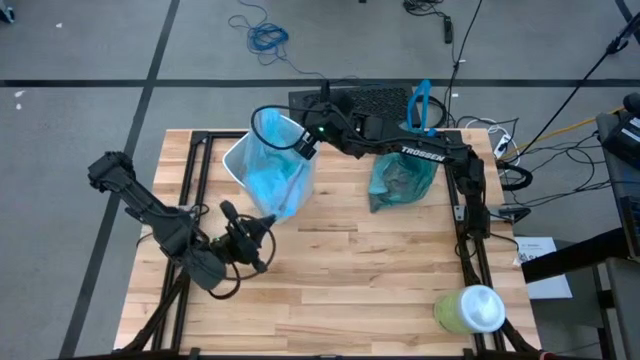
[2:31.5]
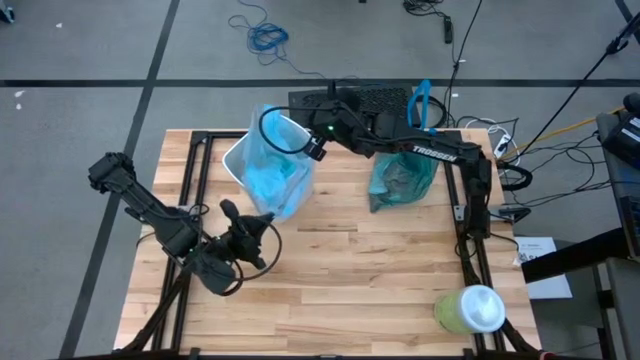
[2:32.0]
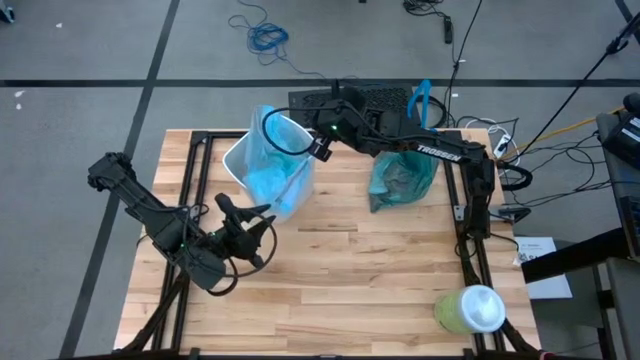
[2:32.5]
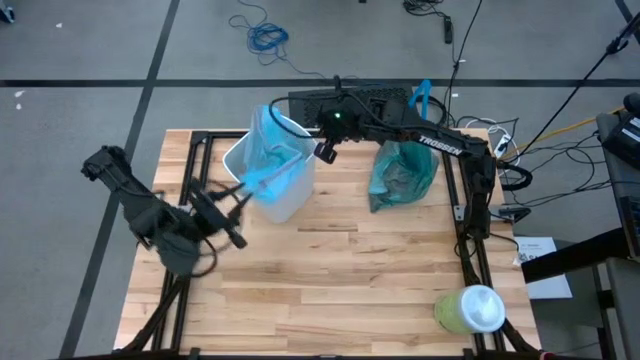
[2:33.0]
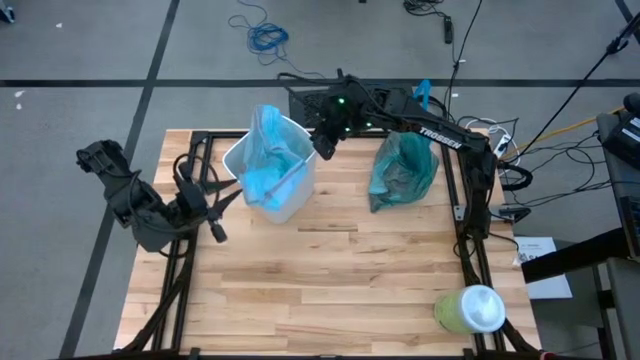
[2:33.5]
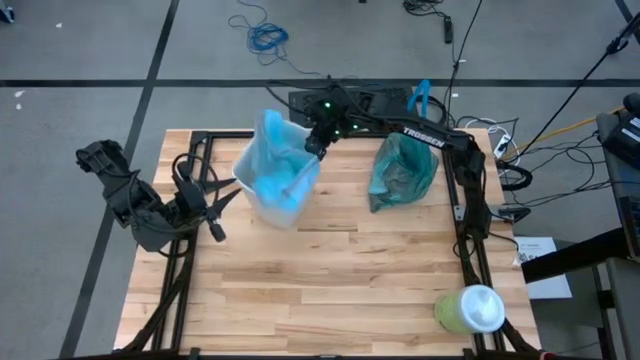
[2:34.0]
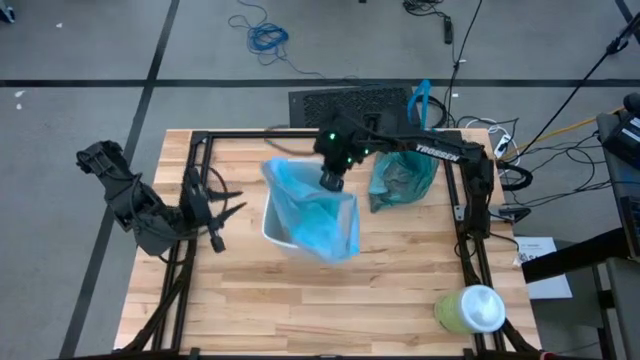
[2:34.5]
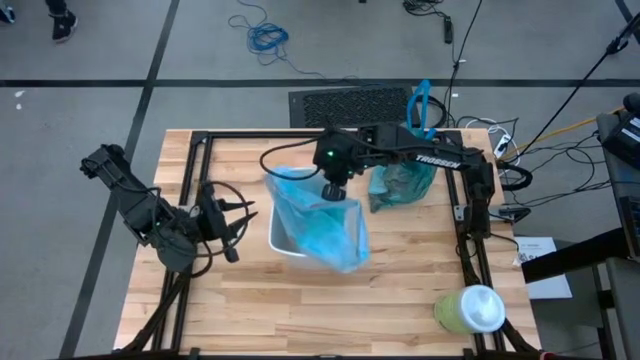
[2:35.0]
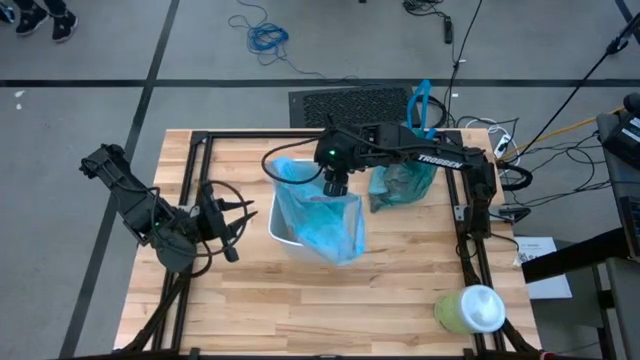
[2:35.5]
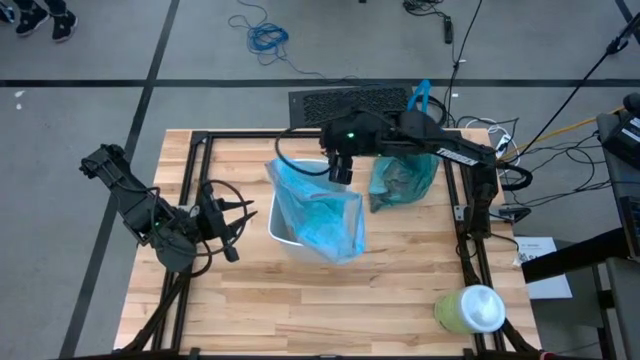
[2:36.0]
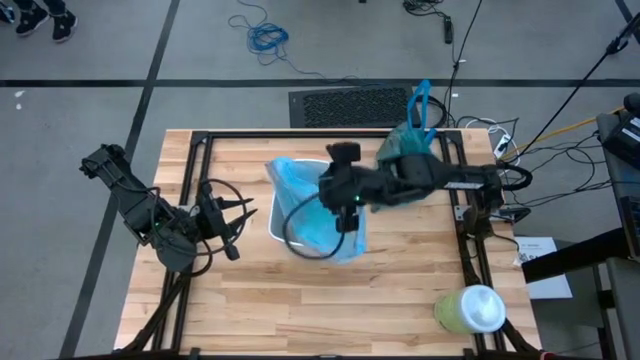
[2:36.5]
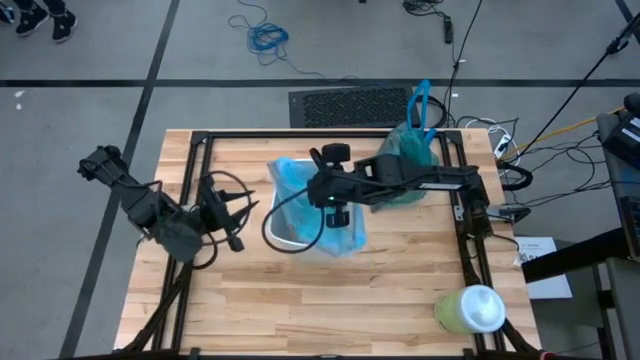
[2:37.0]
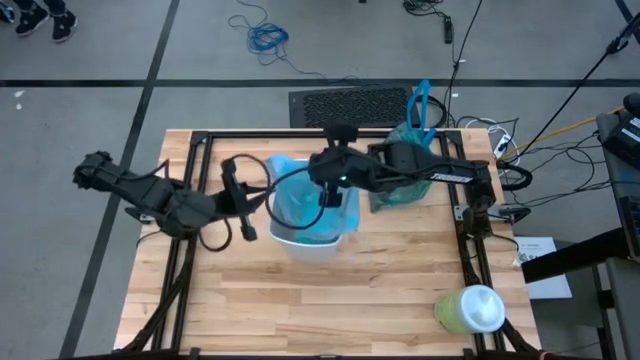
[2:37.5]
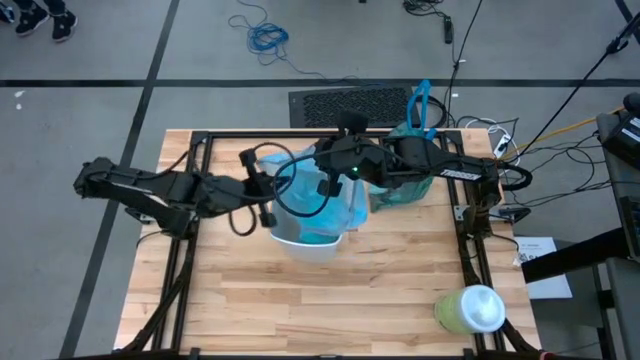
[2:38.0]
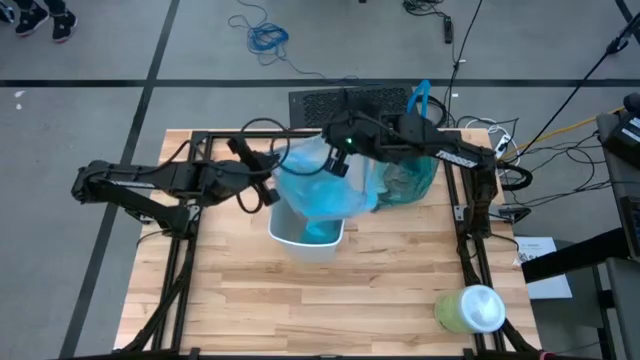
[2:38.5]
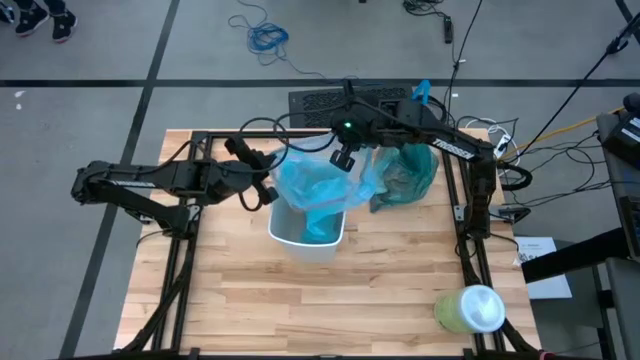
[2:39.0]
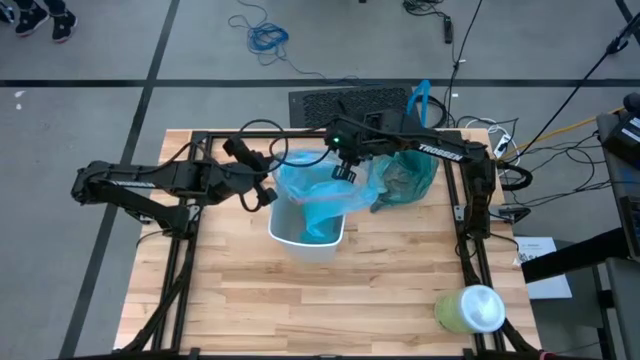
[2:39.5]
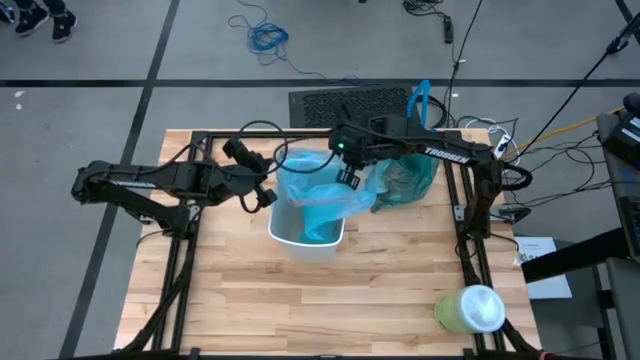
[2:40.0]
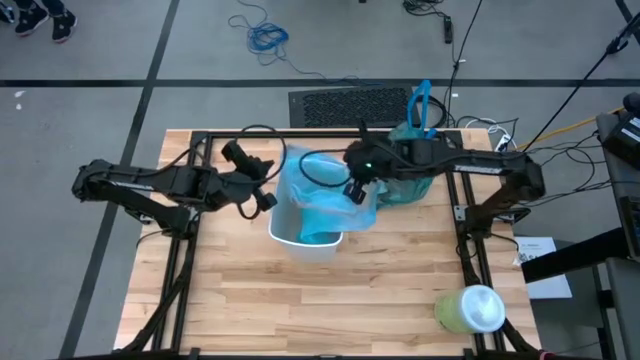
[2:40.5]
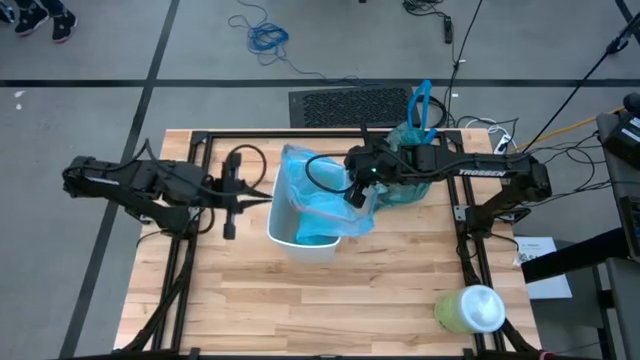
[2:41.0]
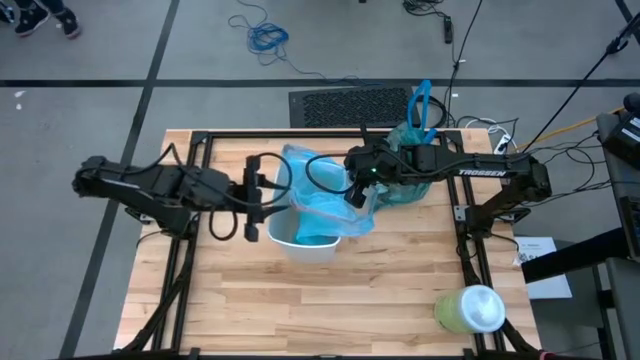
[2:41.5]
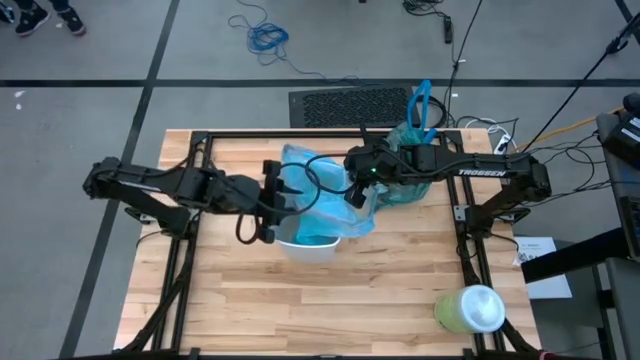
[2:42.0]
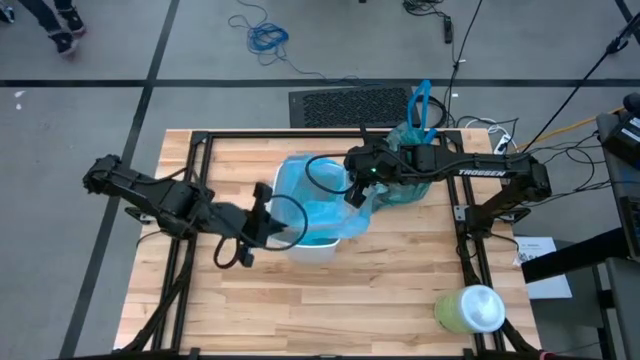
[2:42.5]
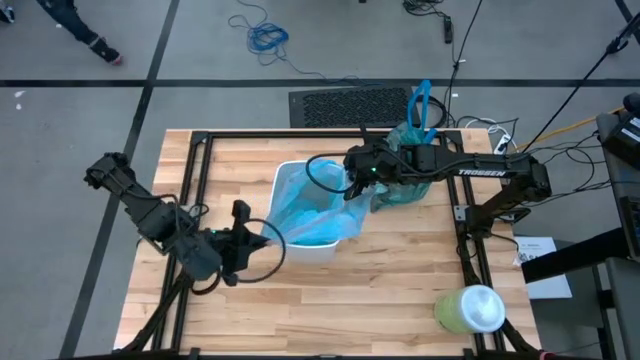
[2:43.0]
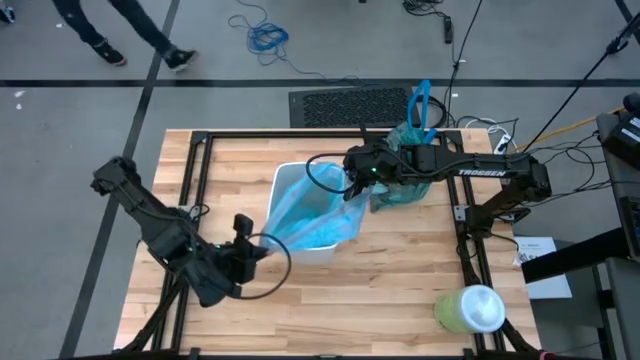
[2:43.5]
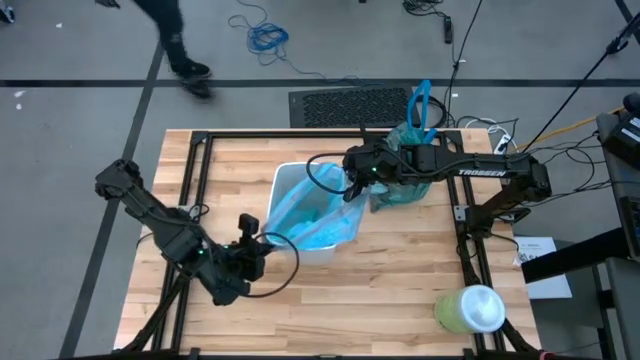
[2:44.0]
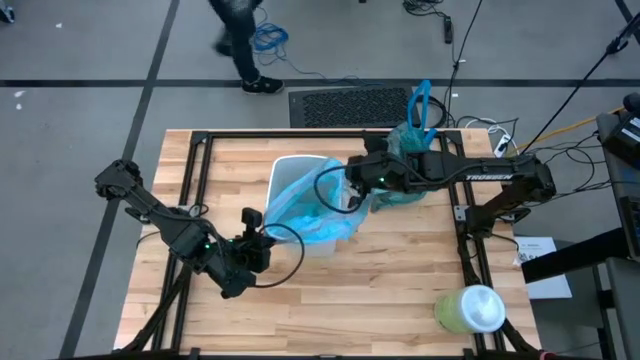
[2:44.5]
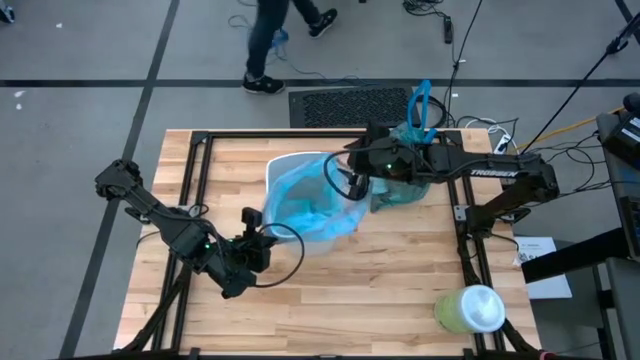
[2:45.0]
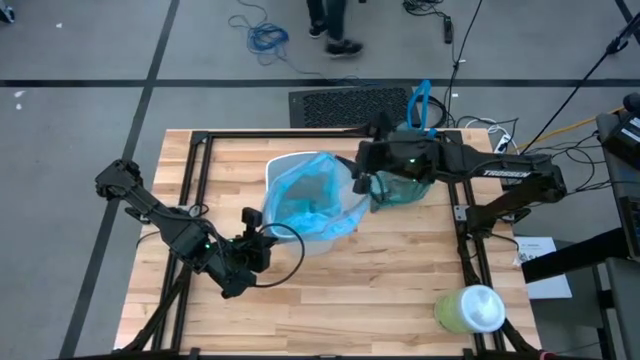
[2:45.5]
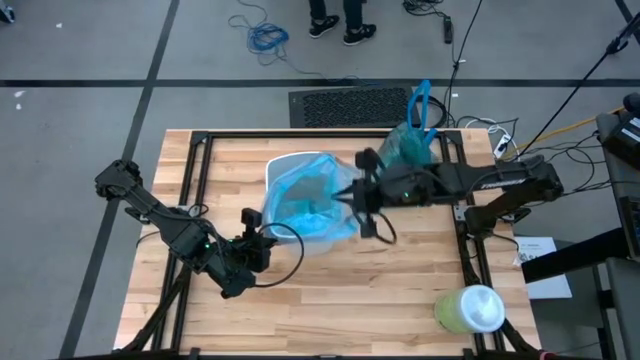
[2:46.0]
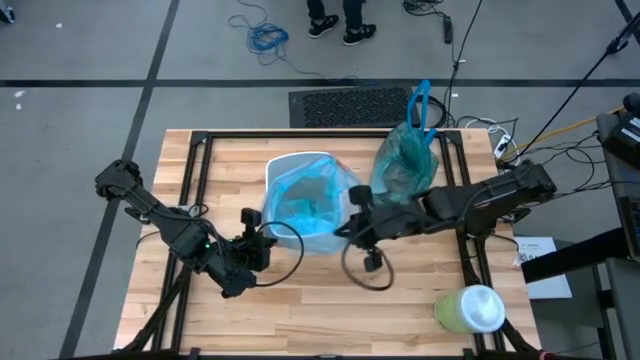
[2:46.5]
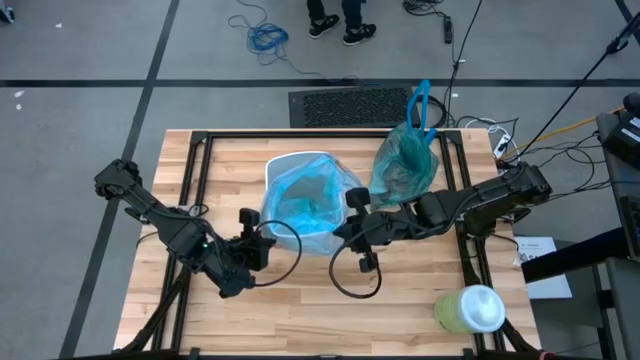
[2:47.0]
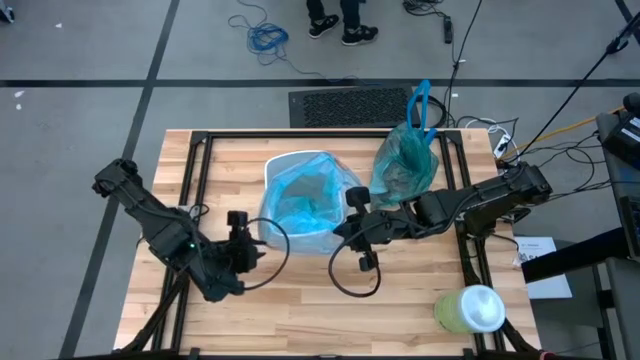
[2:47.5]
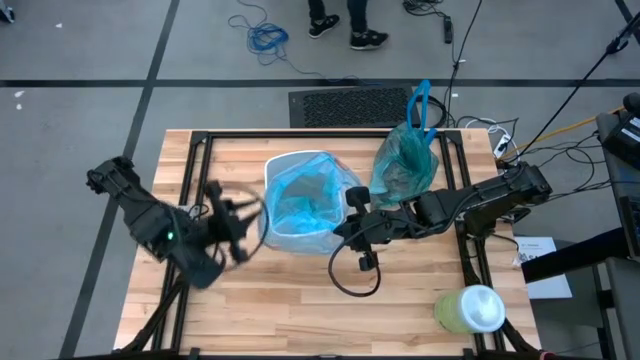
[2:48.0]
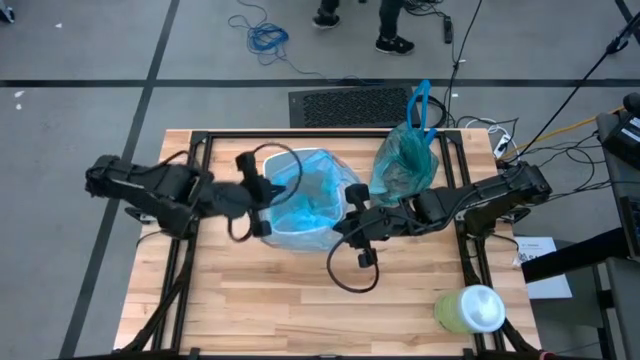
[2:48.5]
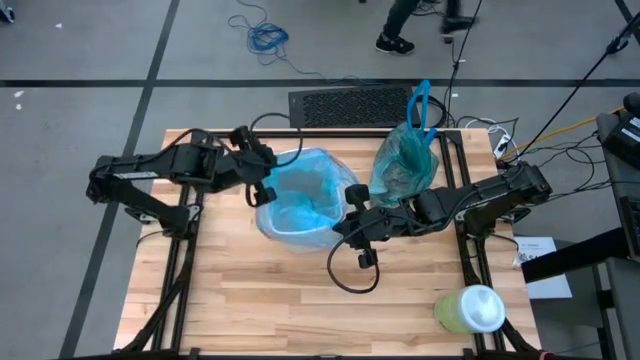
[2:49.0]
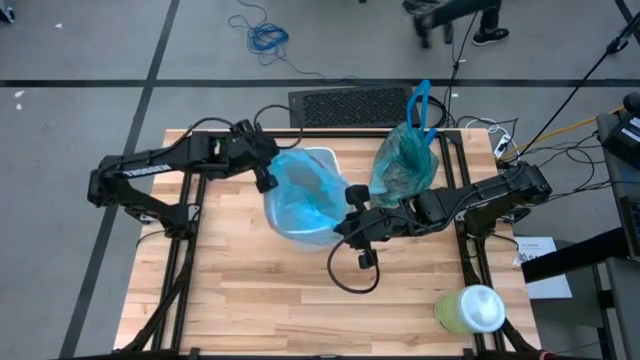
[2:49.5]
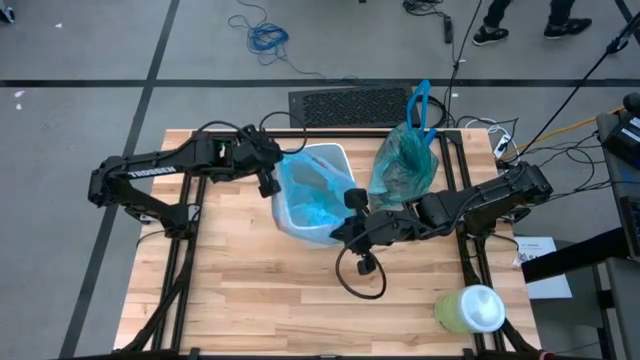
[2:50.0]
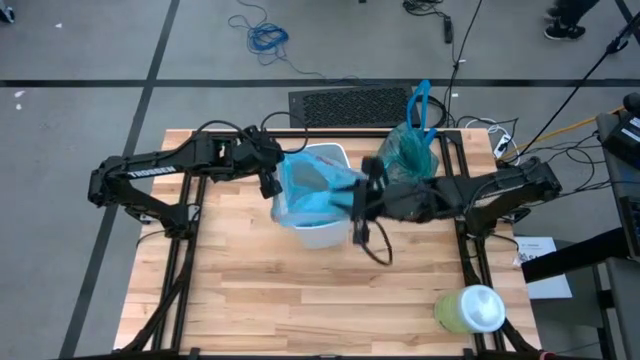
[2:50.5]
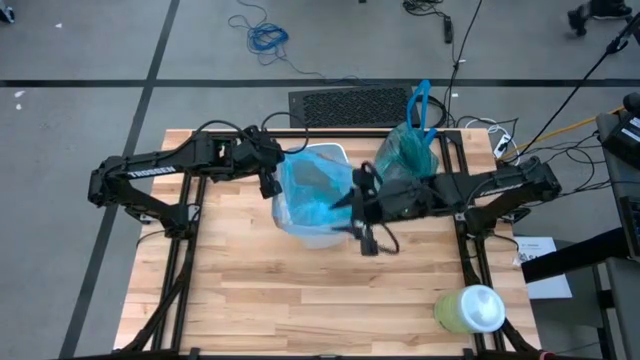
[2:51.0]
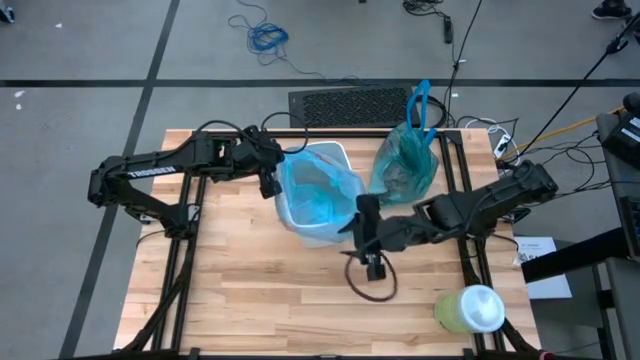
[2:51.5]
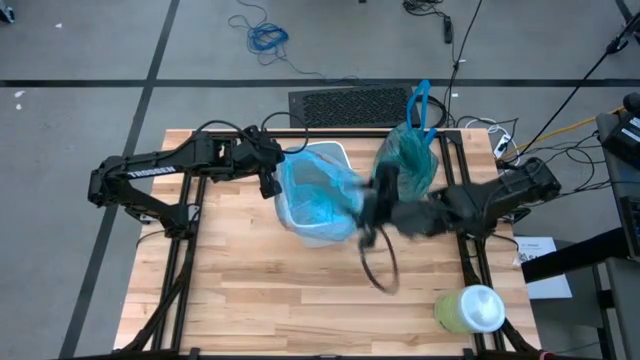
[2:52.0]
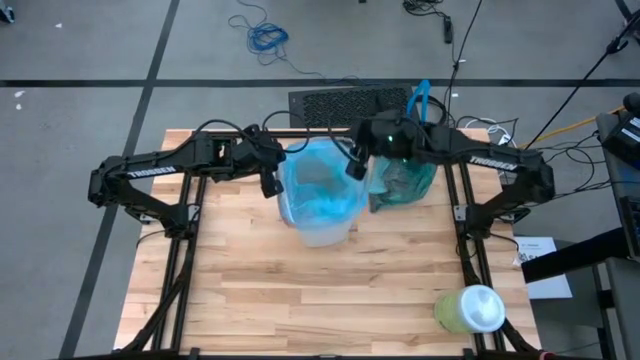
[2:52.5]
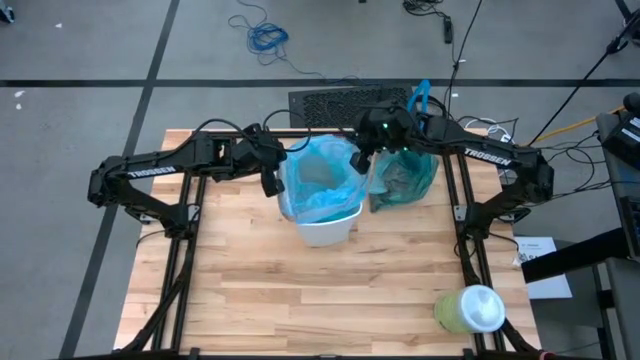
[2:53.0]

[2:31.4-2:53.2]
Task: place trash/remove bag and relplace
Insert a new trash bag into the trash bin
